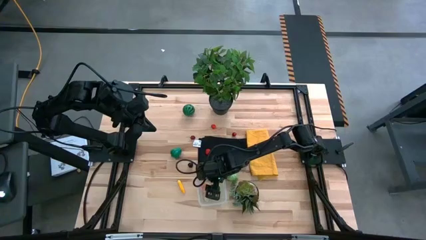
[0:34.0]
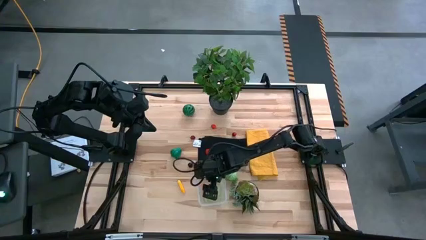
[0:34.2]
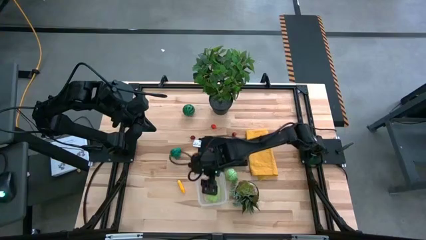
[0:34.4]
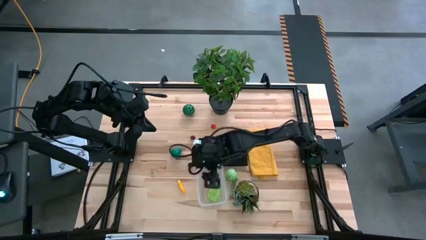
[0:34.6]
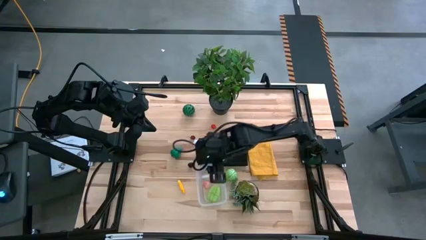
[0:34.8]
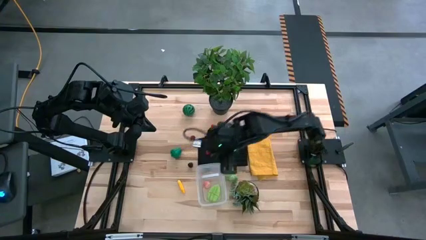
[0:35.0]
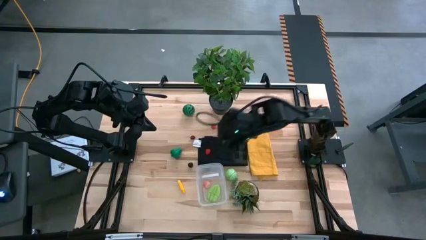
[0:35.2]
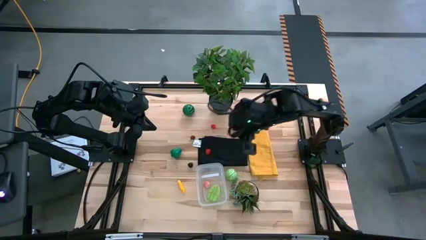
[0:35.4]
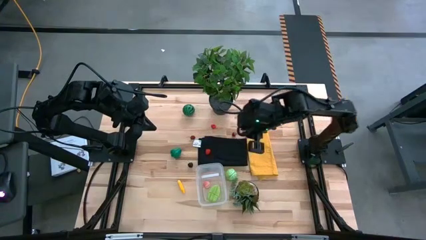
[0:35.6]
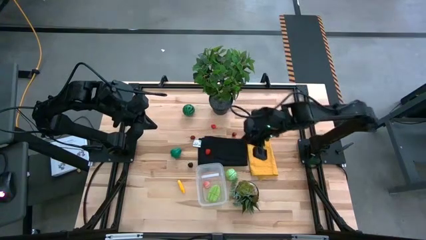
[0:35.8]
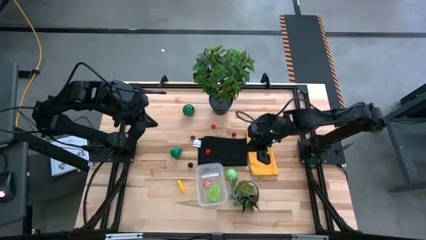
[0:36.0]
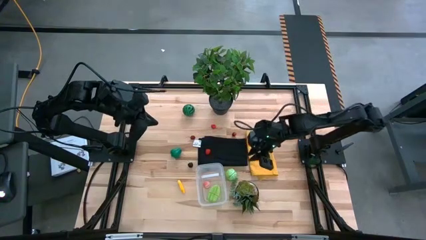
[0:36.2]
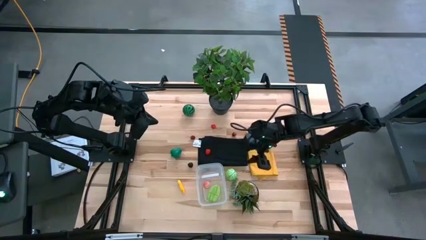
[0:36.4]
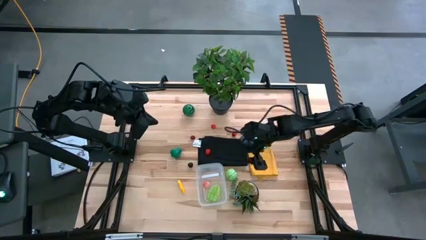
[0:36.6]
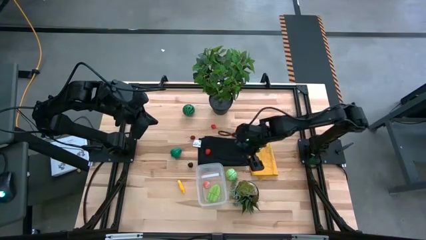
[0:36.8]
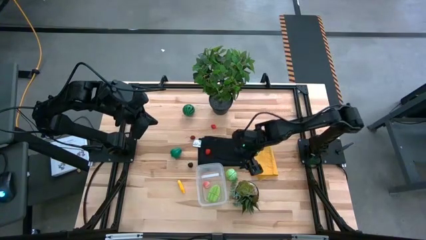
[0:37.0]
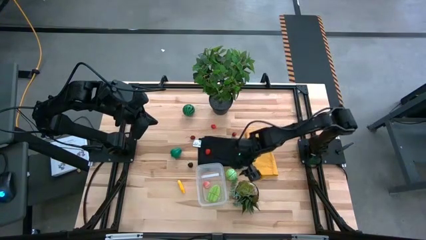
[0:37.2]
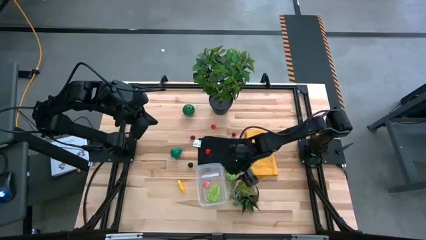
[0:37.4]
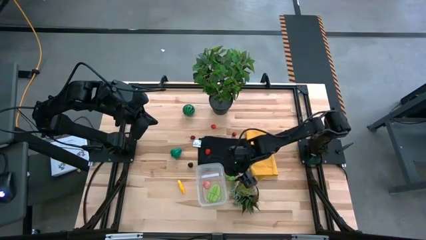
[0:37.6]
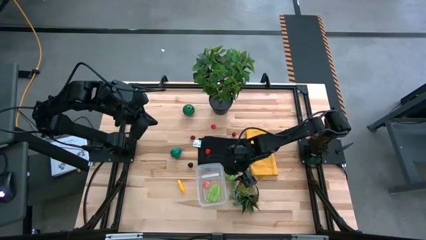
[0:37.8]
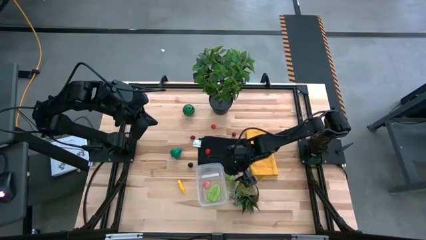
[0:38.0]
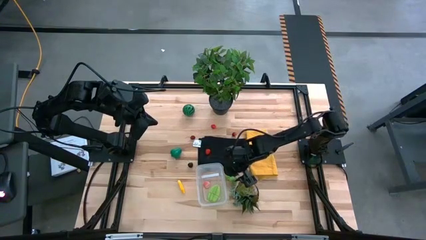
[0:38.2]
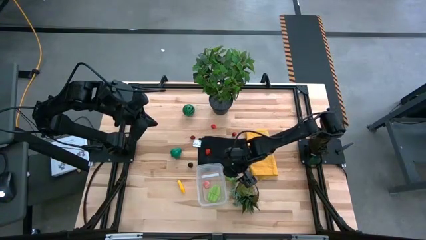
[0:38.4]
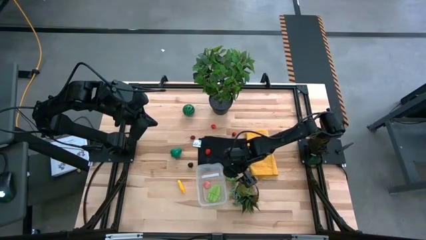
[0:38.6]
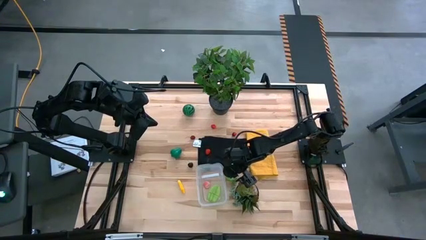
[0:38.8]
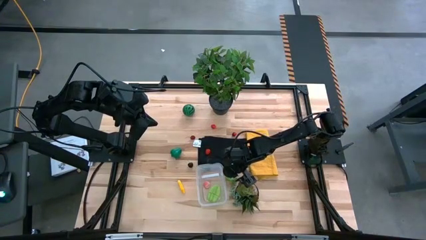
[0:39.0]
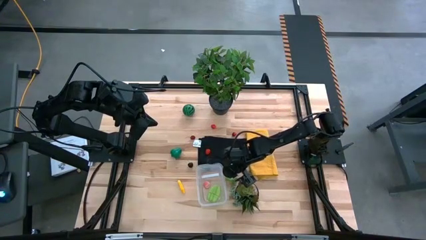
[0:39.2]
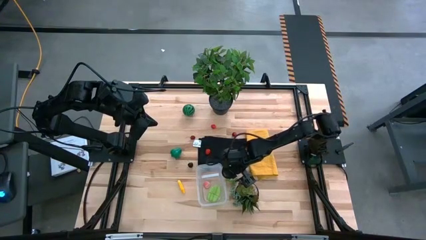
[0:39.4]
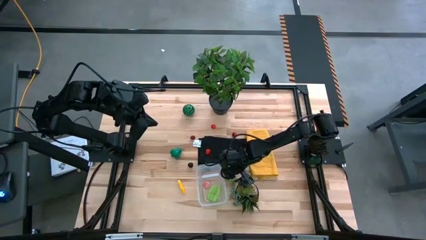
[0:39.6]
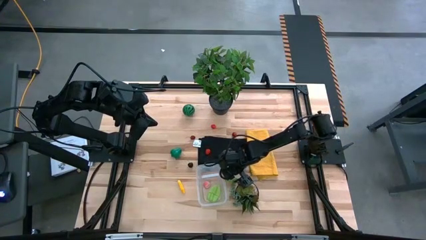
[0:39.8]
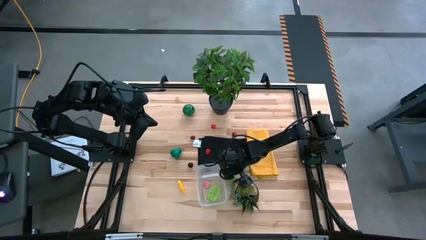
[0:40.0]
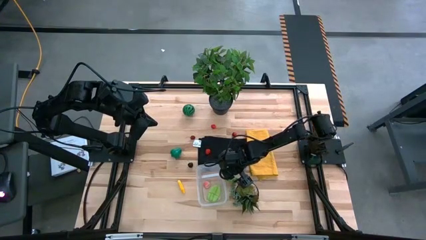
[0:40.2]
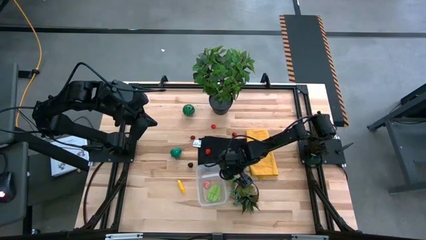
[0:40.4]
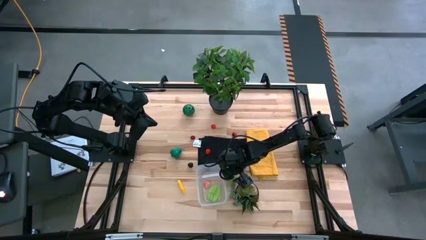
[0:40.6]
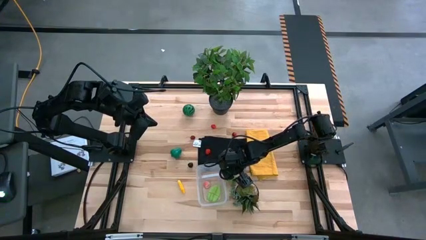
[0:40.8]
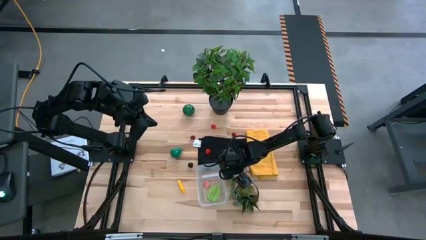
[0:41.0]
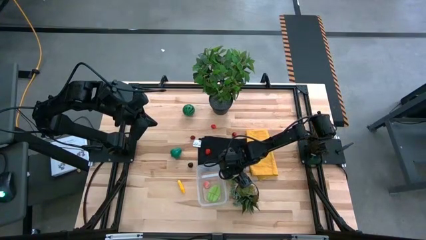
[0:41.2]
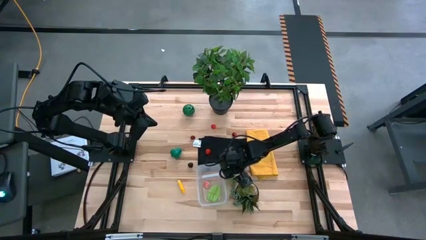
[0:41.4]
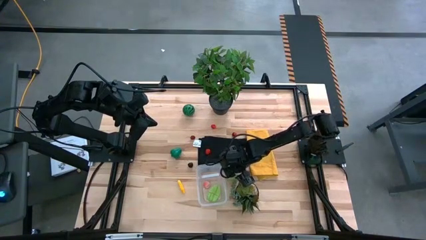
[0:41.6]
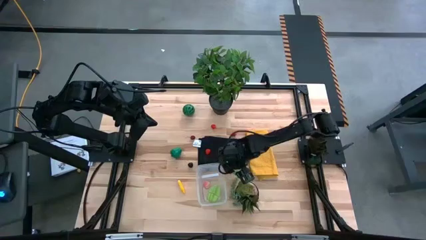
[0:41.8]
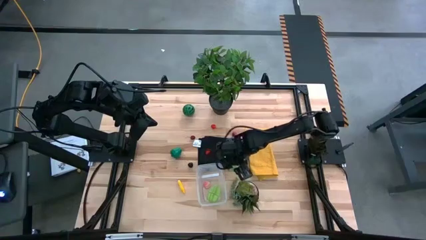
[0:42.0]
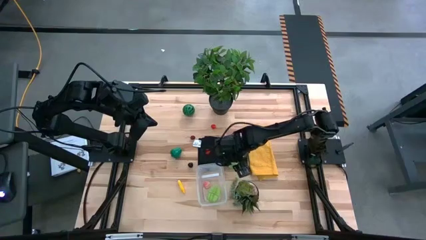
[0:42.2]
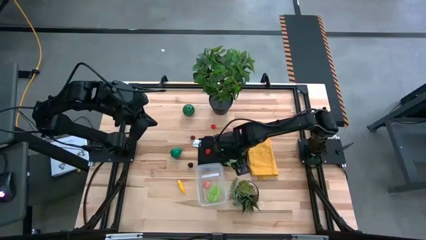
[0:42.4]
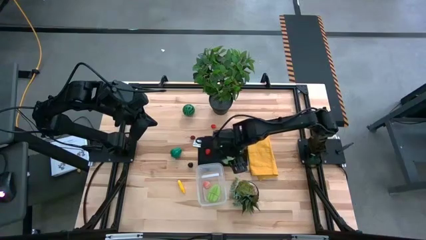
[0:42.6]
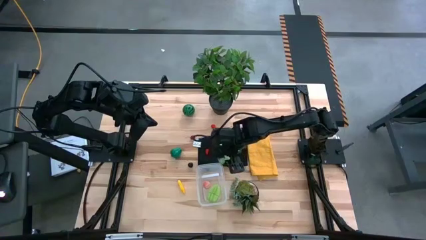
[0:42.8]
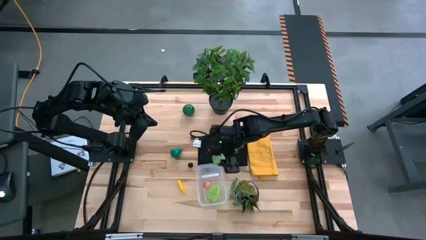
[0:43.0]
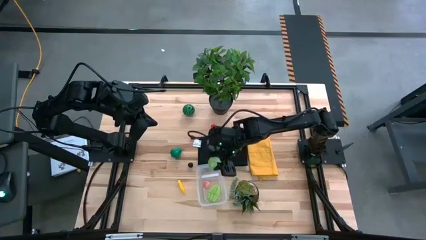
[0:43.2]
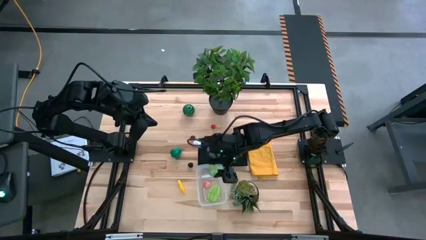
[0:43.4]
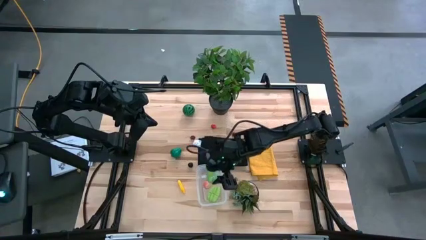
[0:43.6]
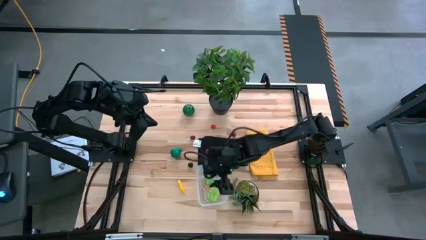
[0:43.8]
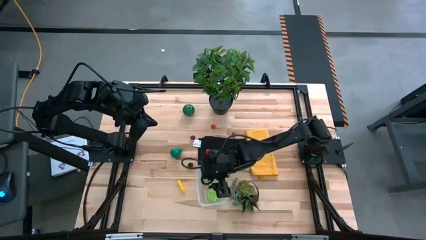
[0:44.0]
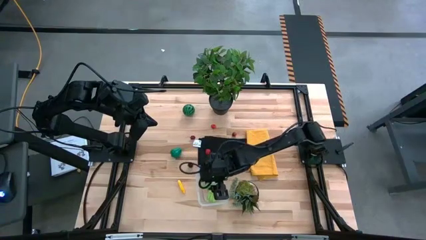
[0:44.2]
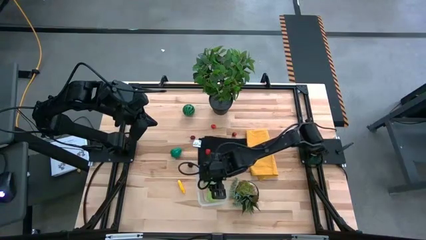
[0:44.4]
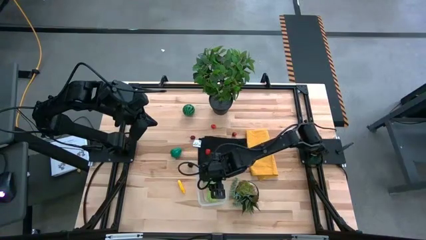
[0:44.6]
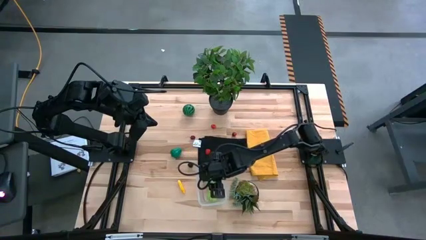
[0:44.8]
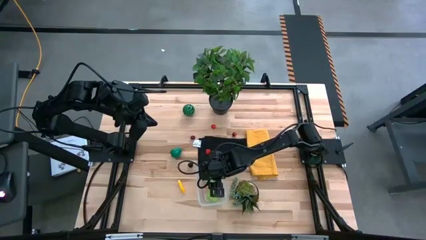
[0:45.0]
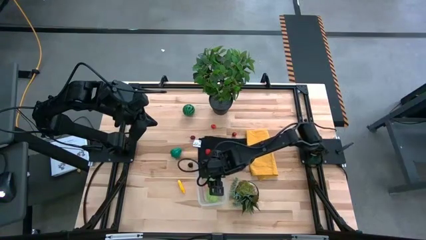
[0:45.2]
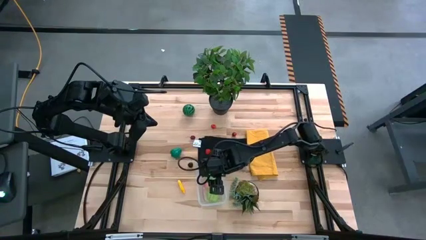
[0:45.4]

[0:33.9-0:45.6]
Task: Pick and placing Produce into tupperware
Put the cabbage into the bin
